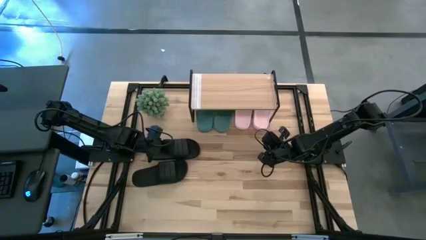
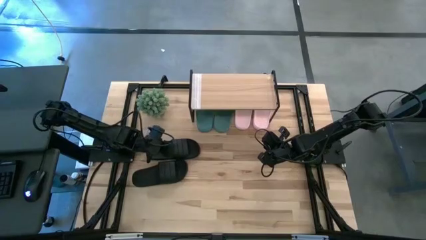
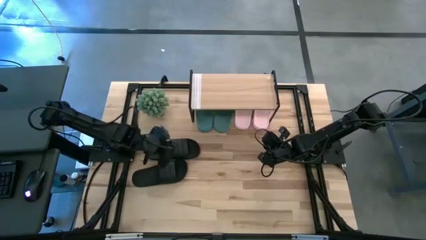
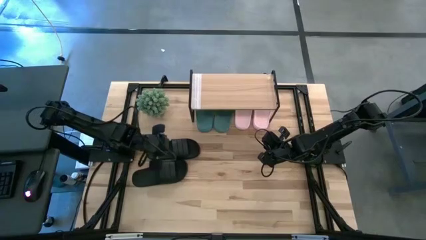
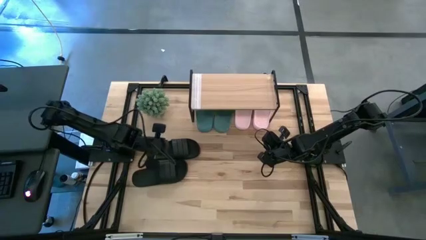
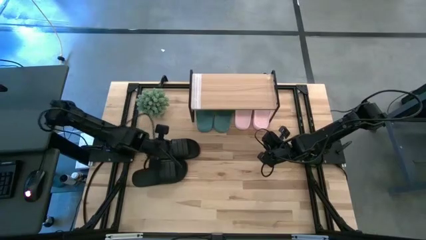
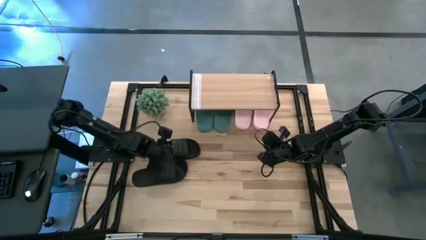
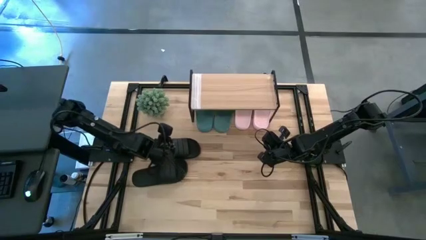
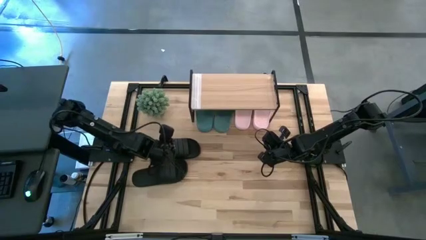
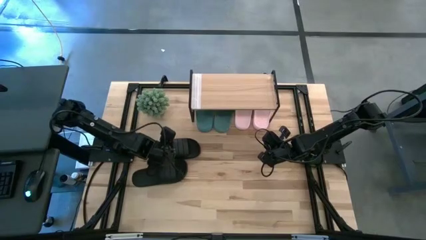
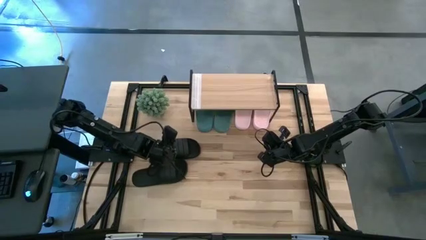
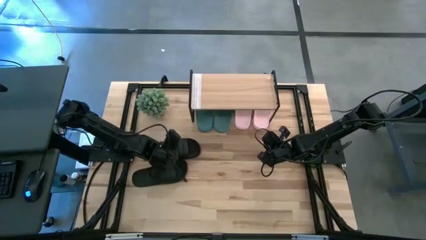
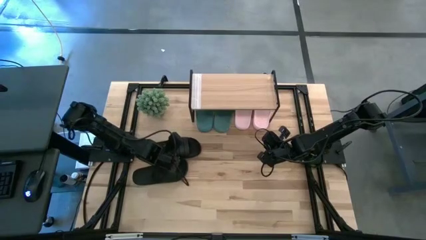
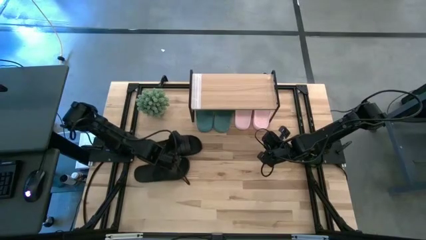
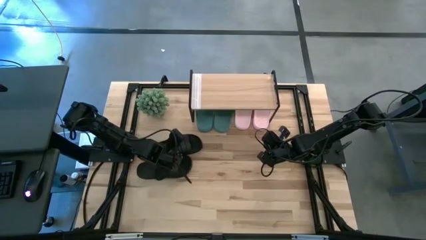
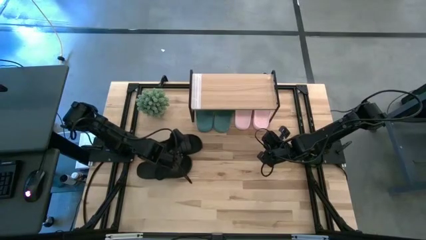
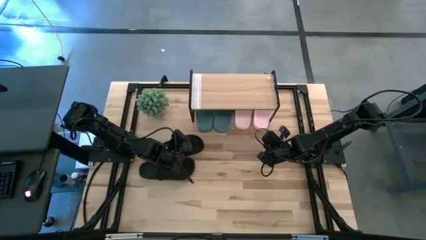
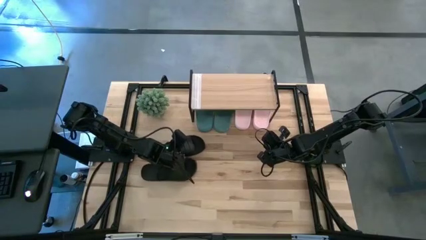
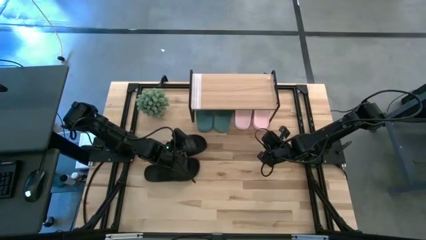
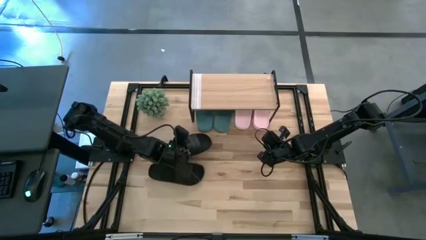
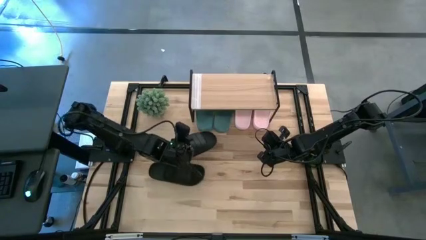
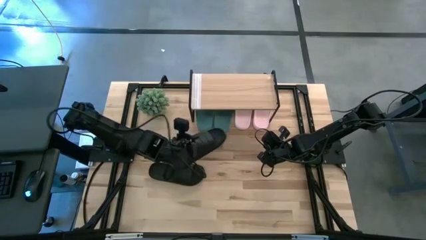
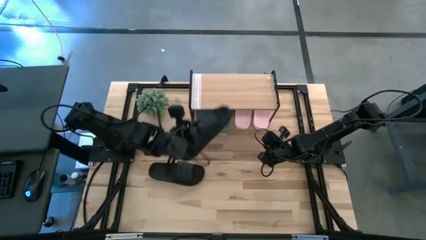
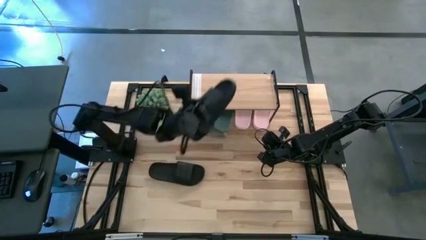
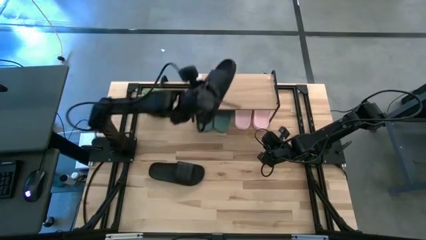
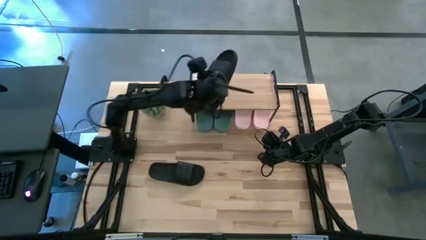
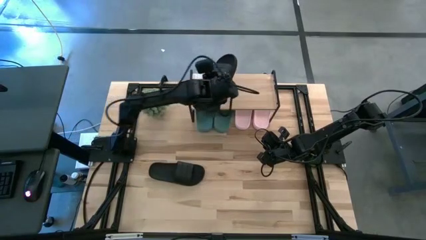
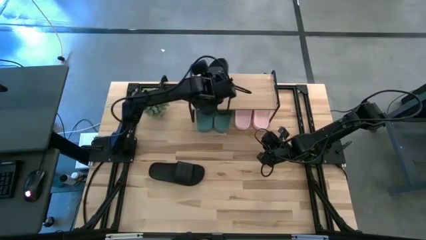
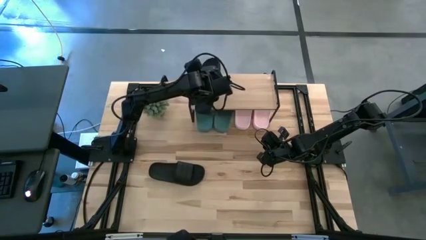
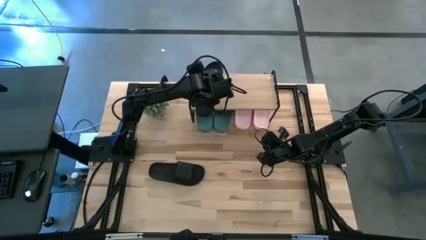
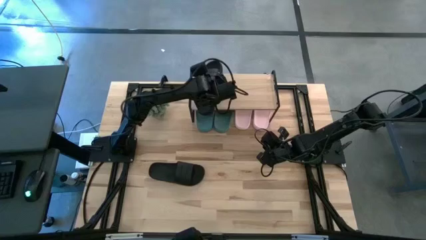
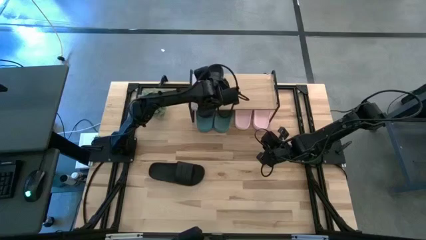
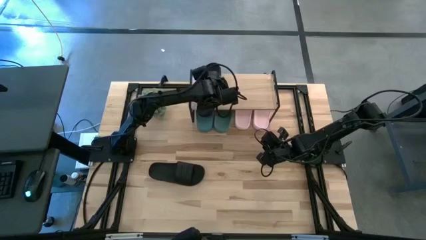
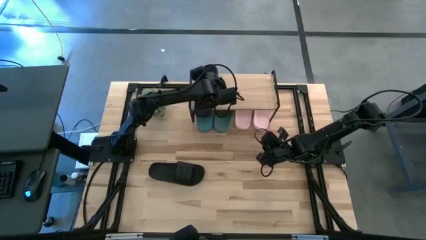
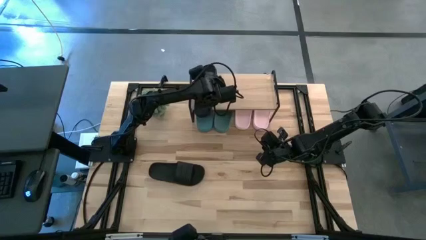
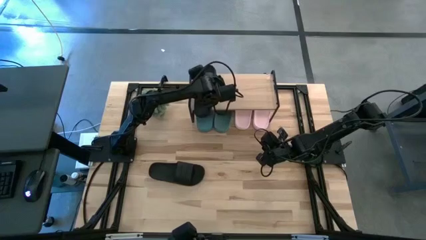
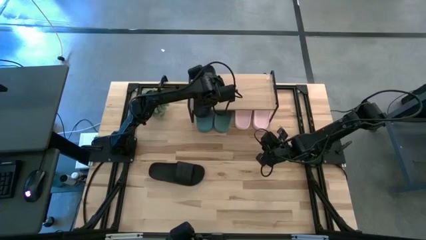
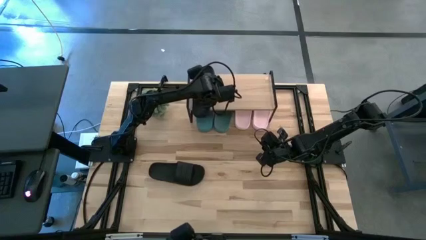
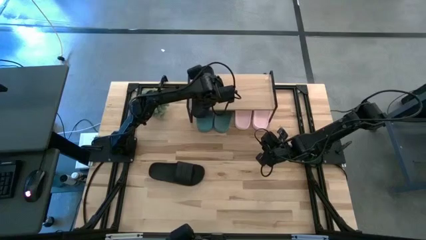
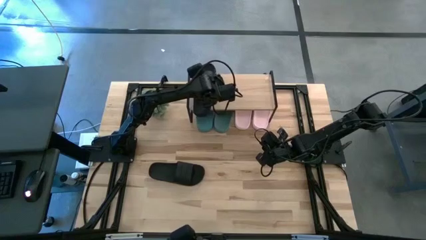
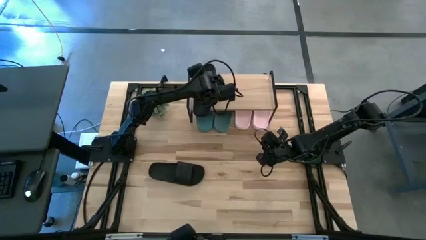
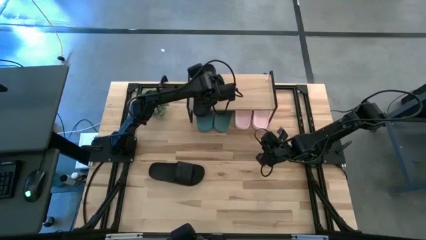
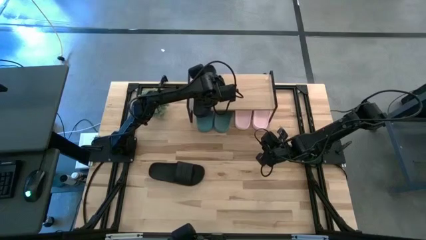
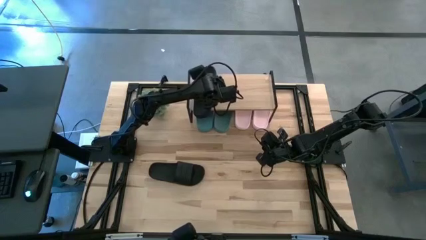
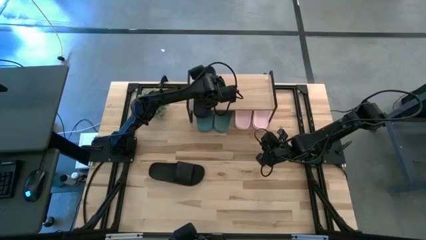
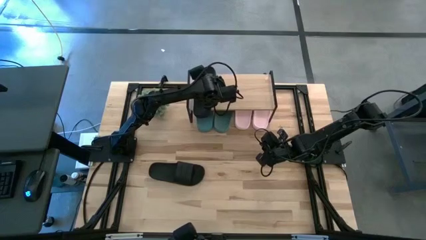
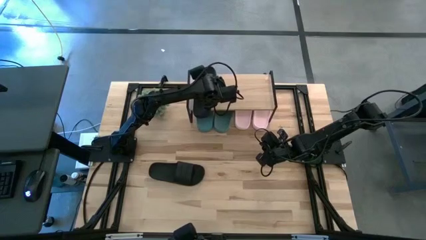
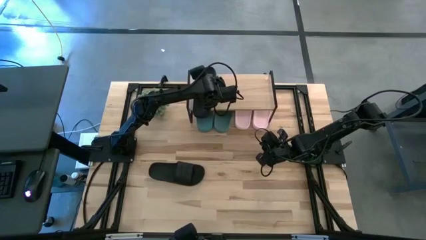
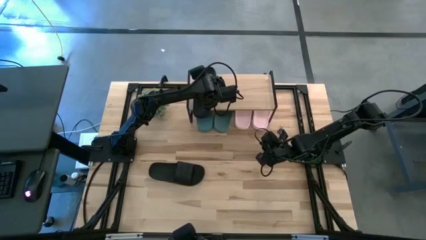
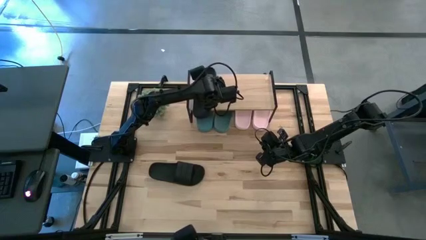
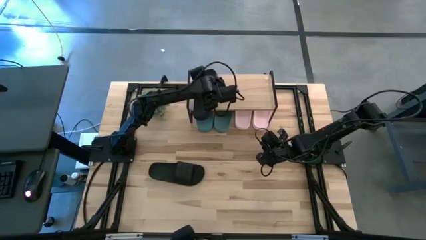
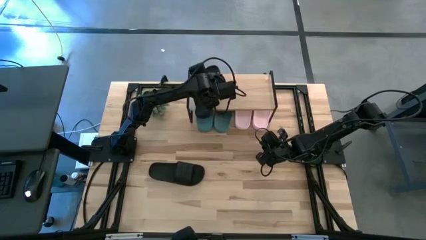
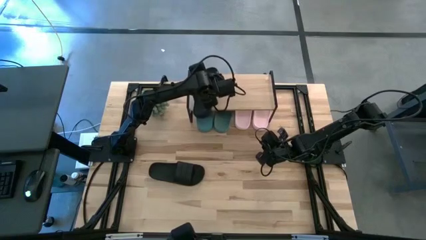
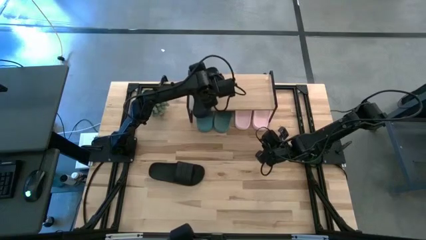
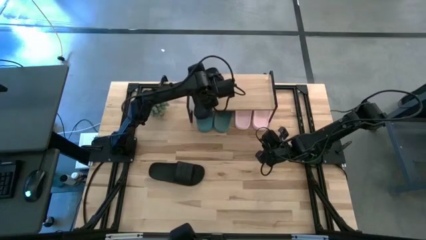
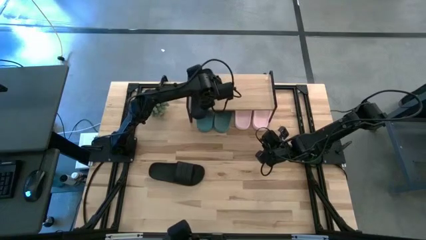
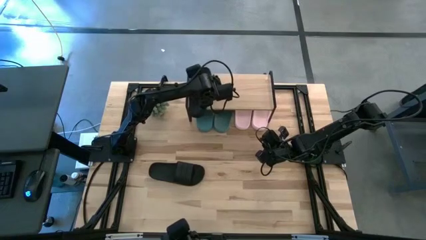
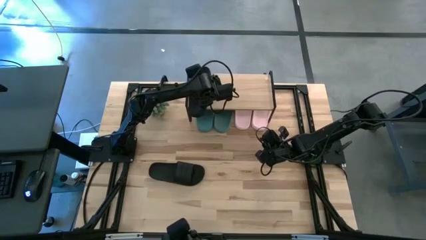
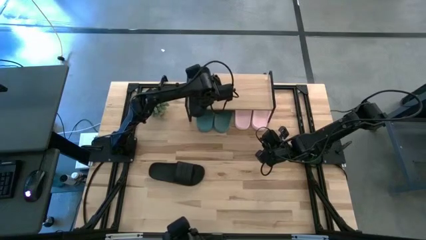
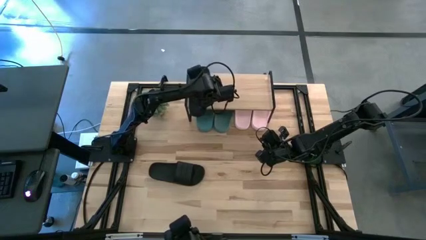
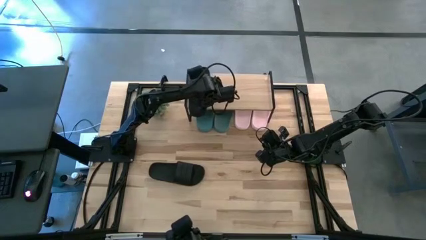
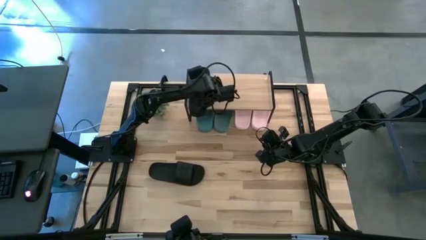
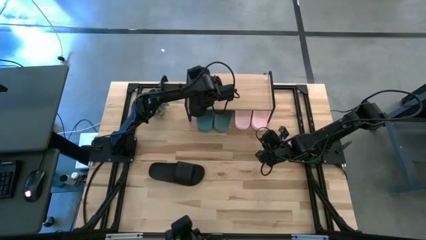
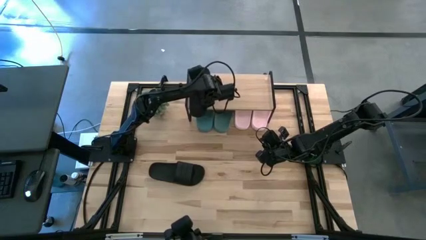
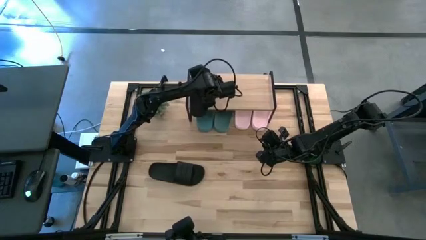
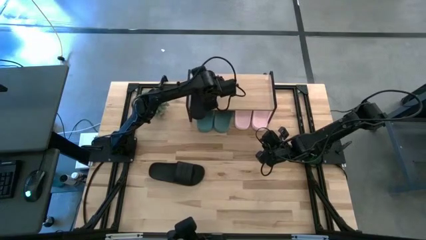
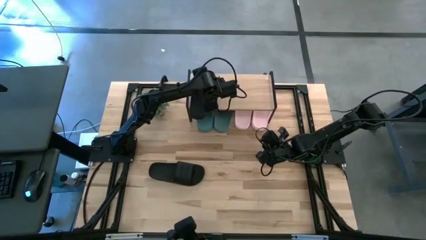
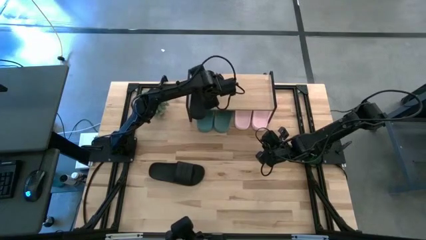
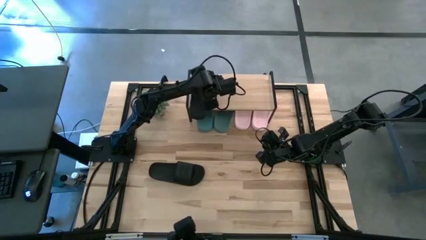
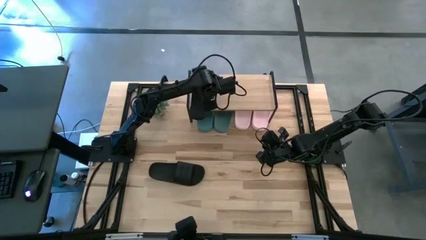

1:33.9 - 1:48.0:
Task: Pick and place slides into the shelf
Put the top black slides on the shelf

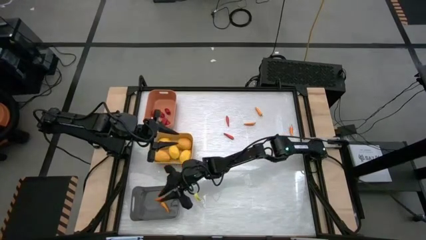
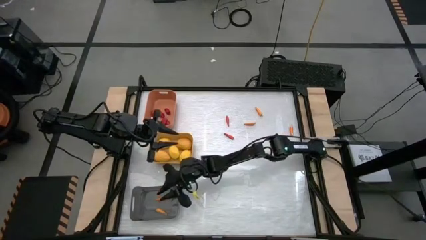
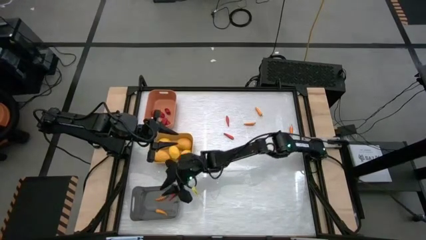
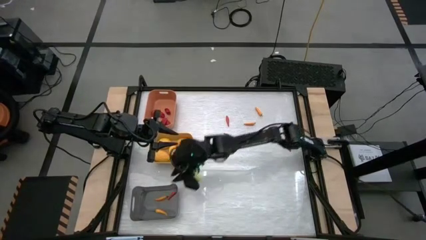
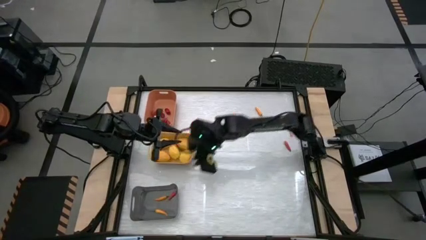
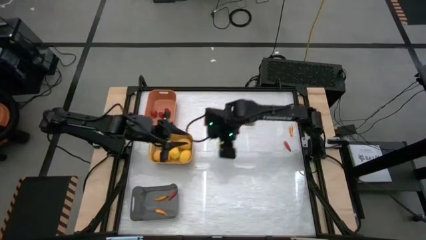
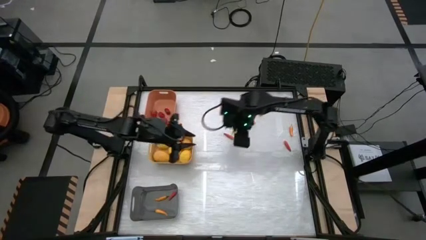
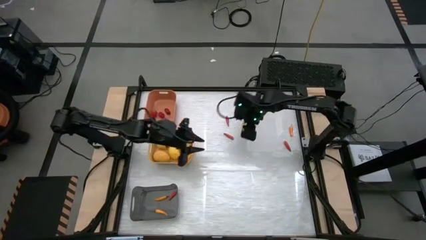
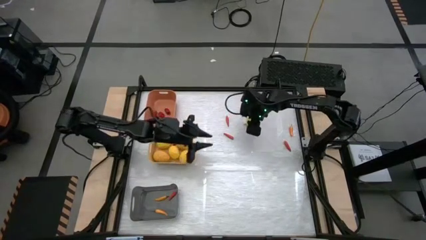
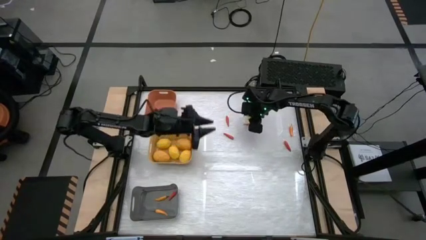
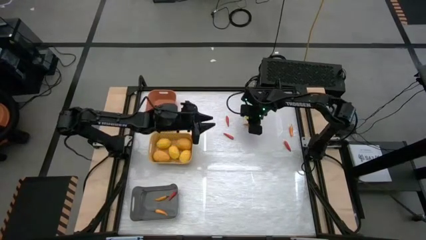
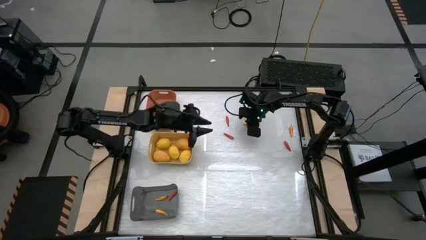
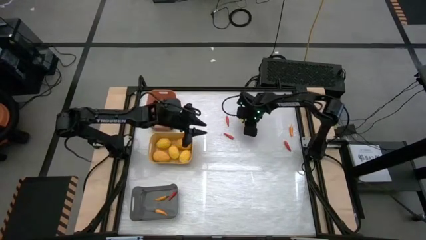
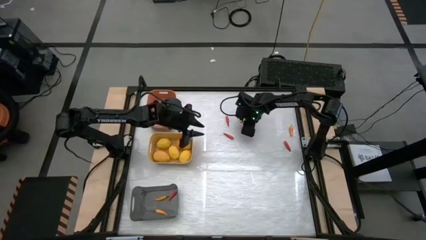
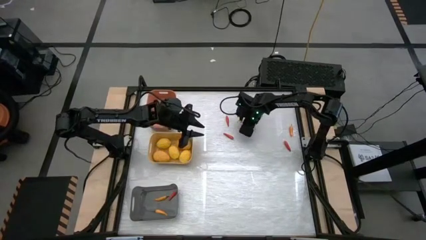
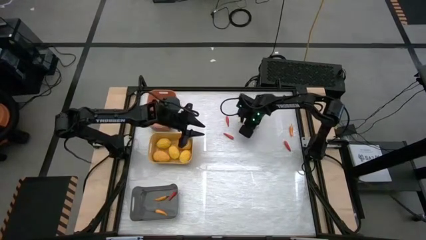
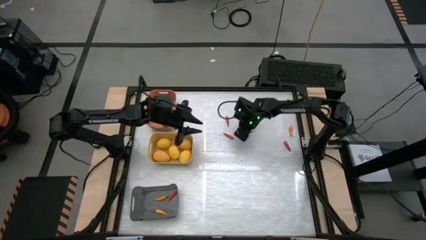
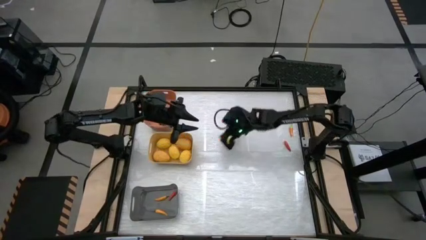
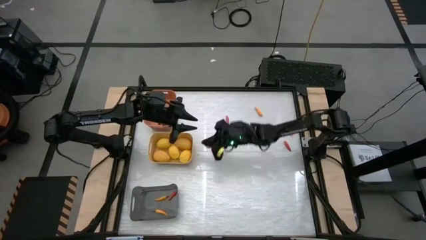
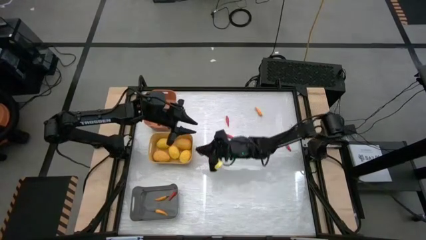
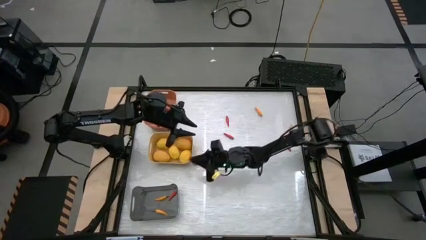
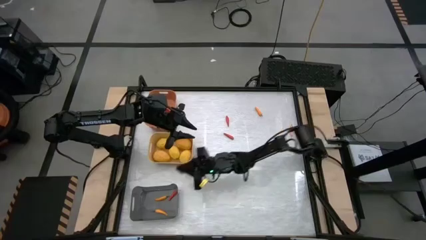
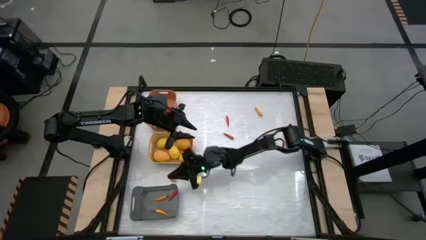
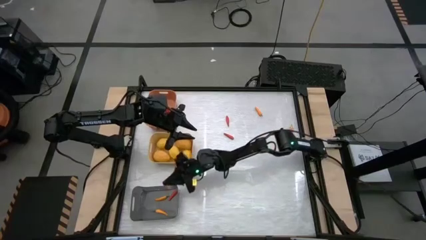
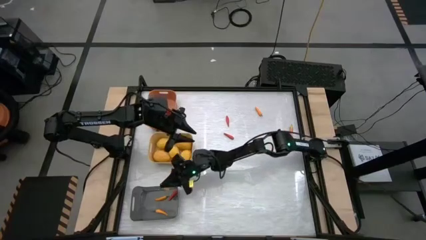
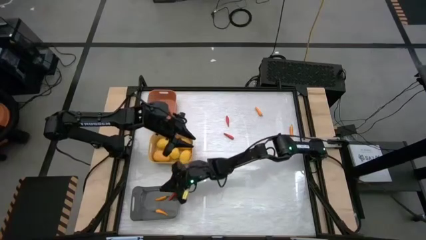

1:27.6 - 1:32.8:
Task: Sort produce into baskets
Put the yellow chili pepper into the gray bin
